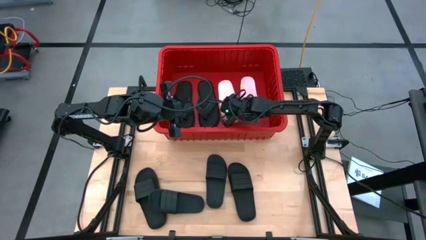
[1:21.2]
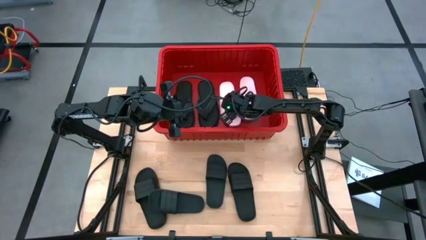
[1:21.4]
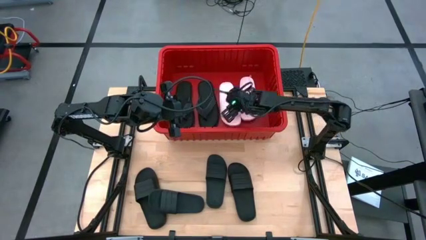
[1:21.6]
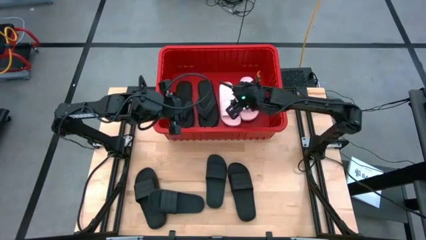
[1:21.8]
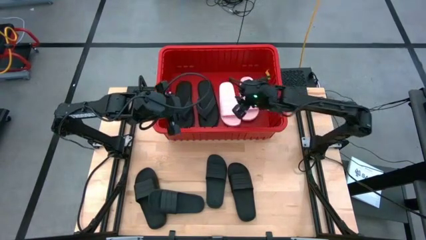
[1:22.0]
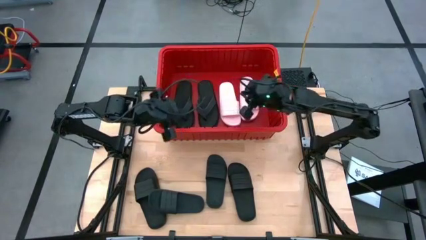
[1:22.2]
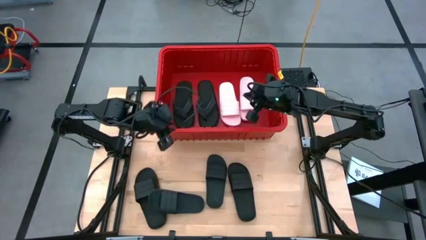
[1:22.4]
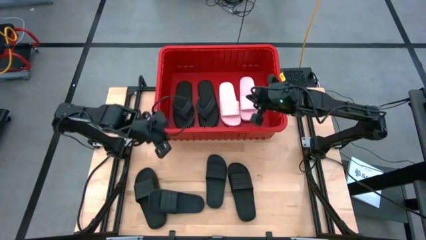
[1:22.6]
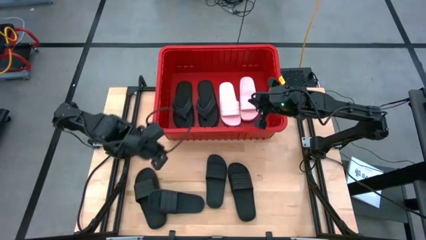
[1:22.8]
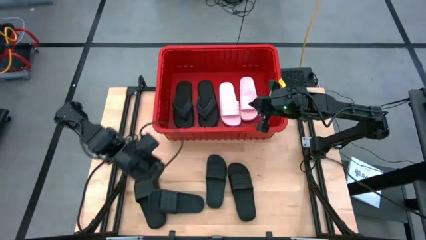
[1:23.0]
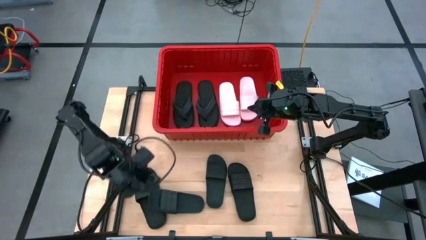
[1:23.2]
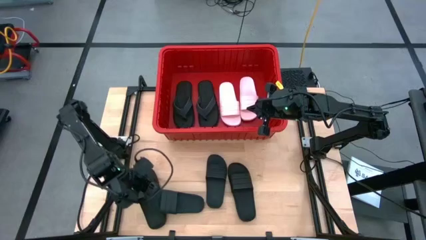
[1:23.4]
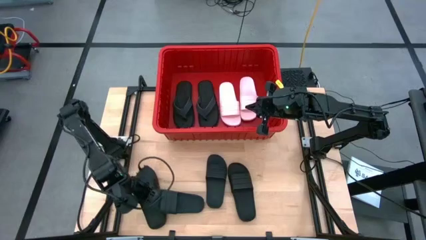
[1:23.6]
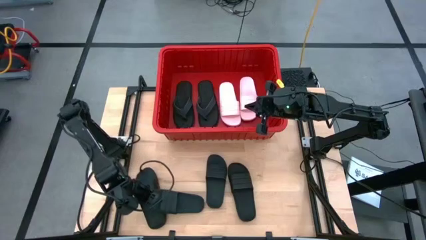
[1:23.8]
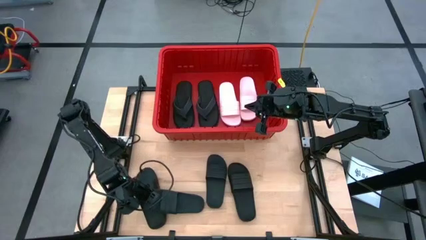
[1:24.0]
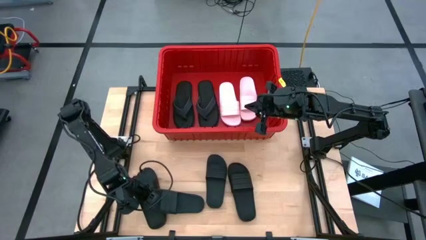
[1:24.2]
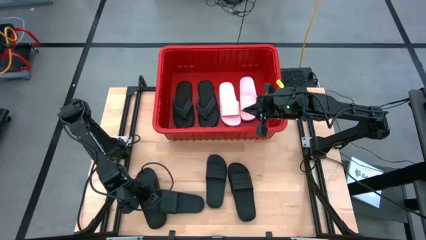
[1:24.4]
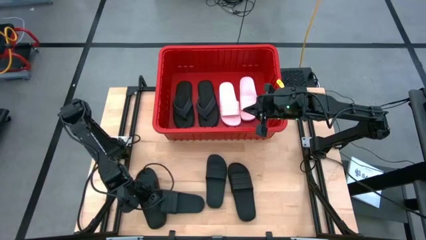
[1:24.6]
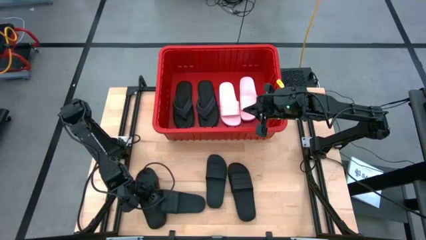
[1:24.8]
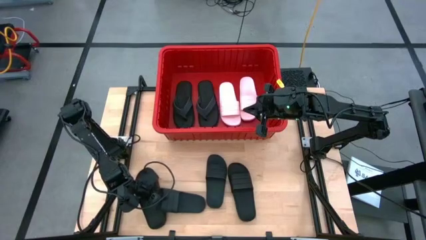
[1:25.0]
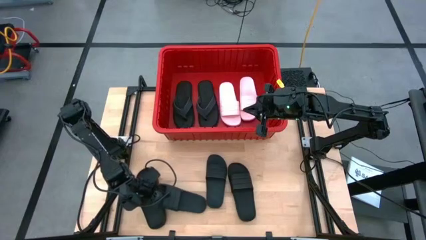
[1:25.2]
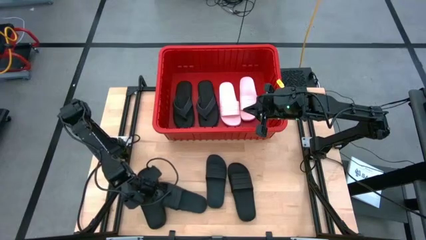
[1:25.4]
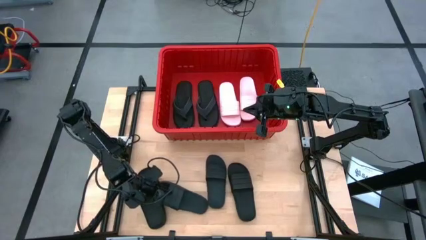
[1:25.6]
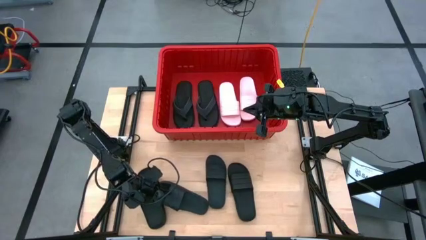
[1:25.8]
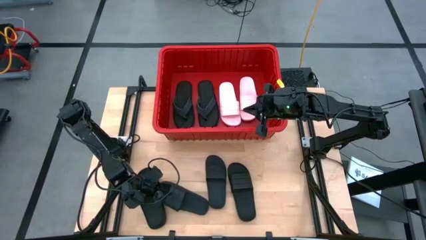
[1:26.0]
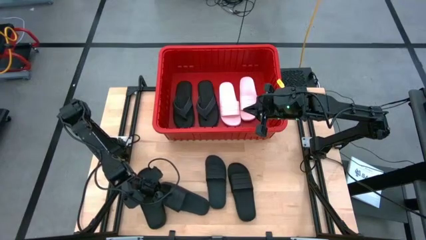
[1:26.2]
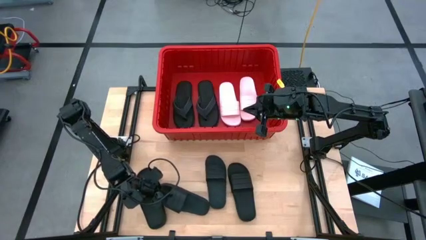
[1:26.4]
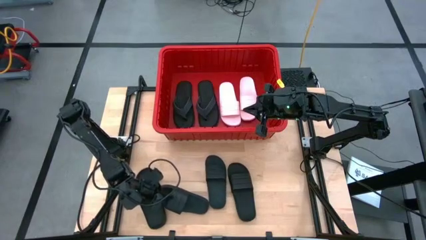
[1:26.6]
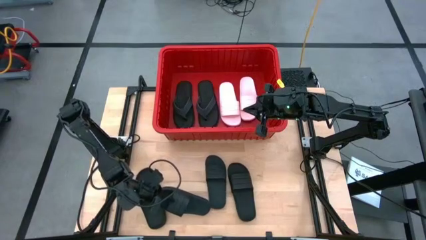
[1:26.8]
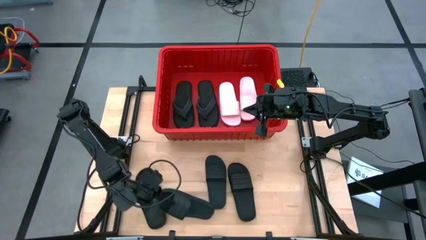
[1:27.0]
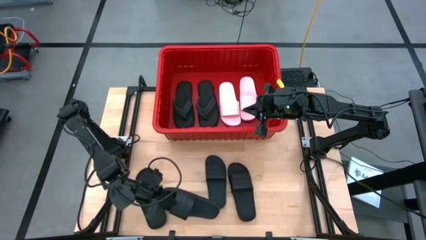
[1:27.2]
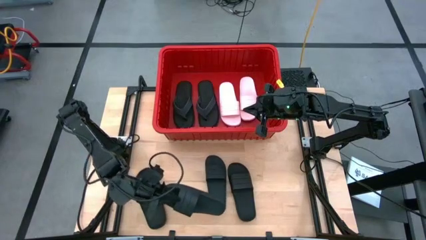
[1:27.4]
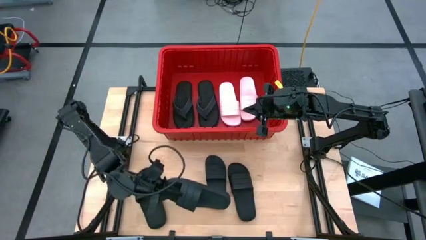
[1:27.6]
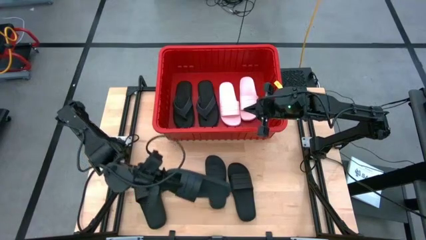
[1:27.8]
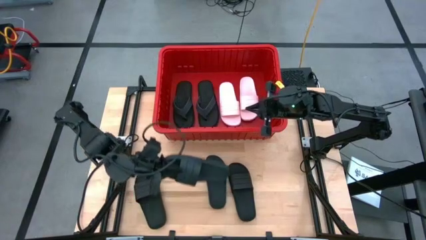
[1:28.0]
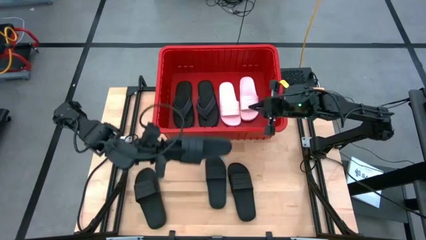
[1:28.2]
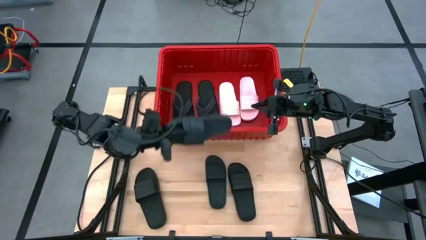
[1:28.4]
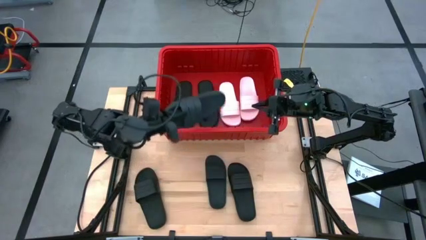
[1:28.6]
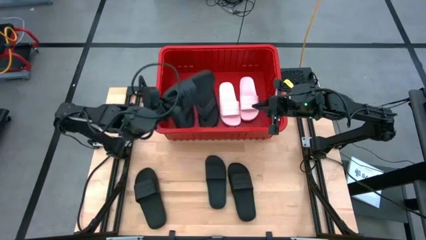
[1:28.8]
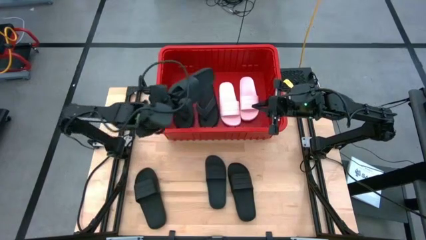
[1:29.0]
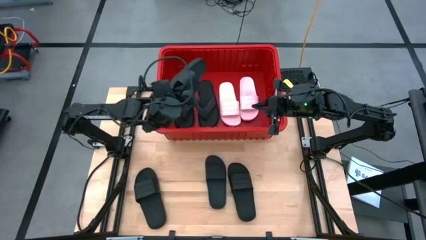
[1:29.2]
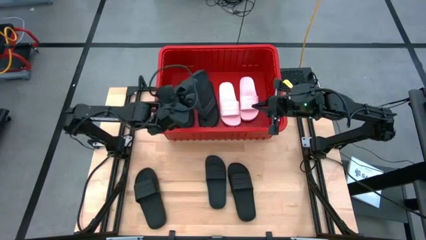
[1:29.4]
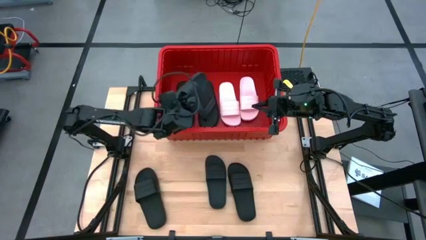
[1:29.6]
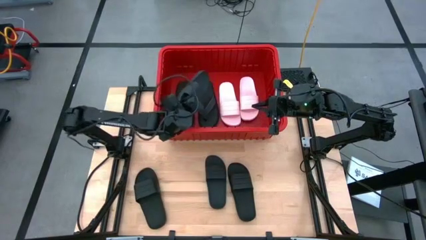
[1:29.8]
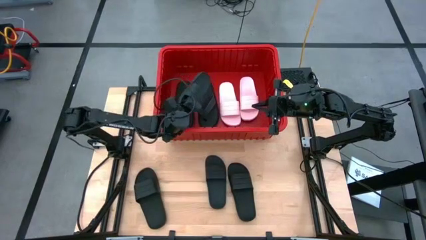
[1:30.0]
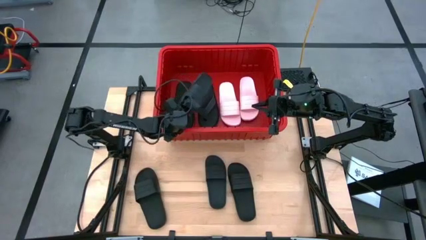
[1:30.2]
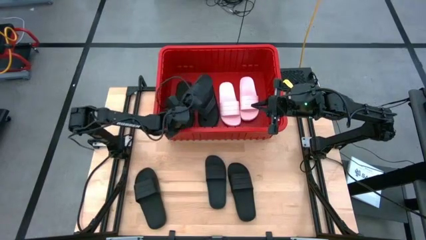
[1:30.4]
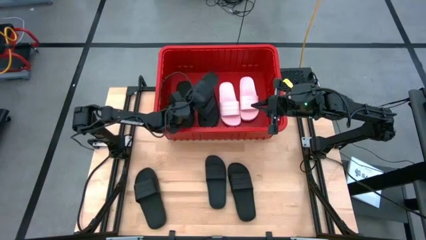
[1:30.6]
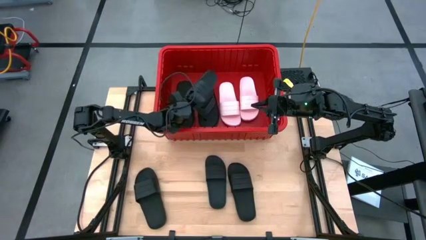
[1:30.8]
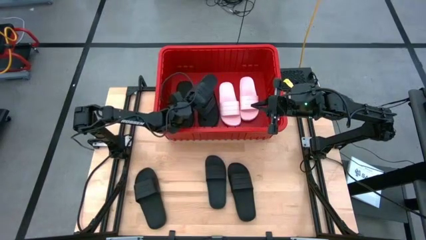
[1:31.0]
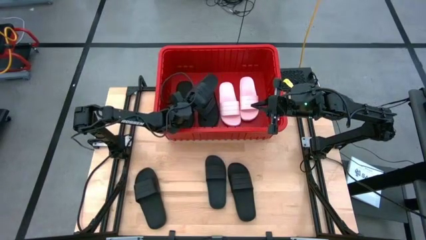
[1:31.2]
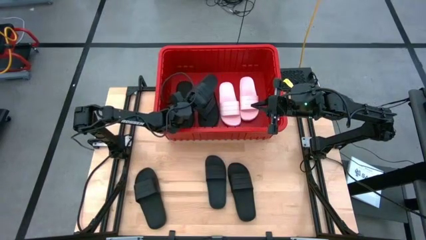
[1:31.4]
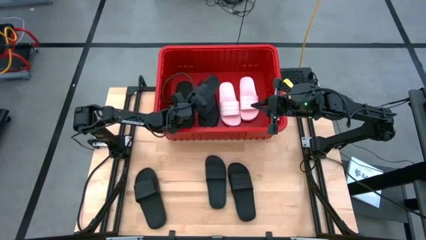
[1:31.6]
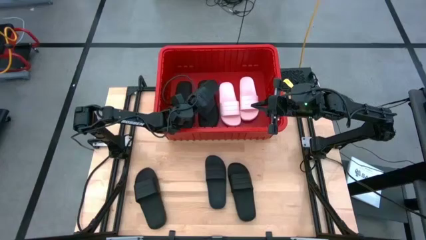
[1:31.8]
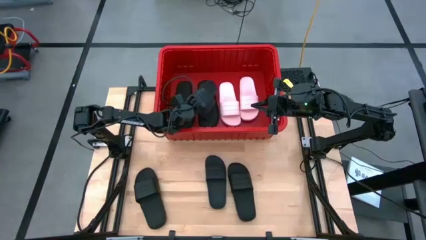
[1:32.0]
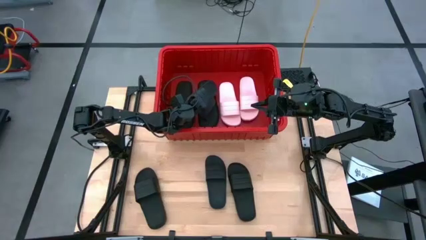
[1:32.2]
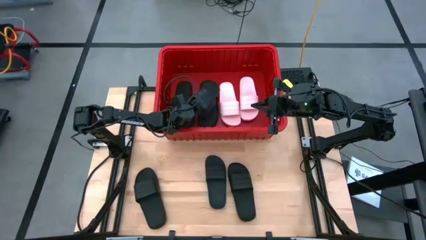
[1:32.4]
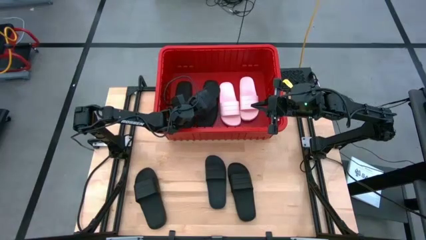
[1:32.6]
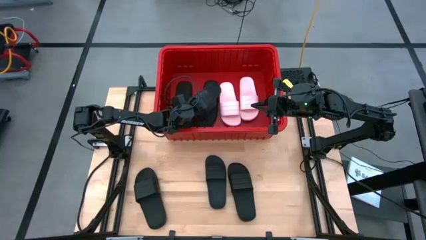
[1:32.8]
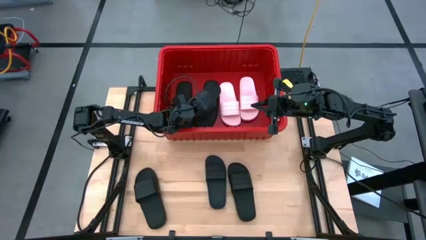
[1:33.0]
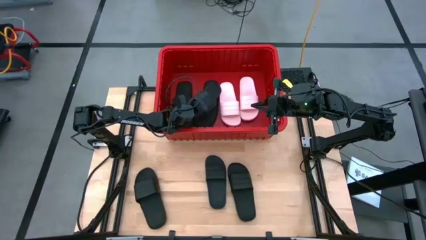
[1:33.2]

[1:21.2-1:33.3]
Task: Pick and place slides into bin
Put the black slide into the red bin

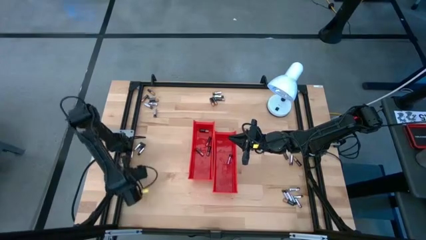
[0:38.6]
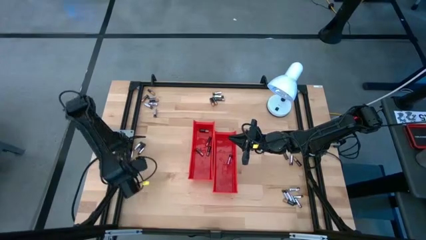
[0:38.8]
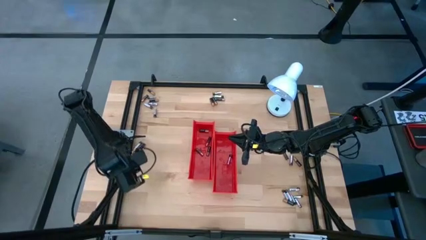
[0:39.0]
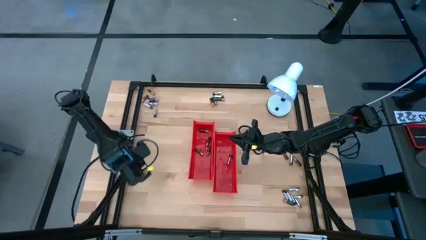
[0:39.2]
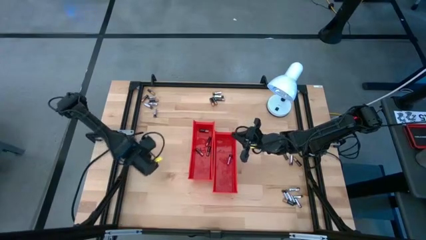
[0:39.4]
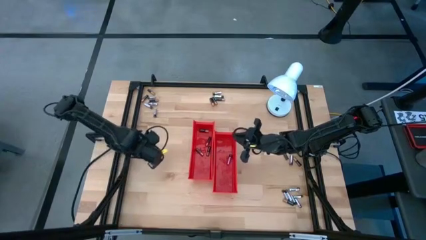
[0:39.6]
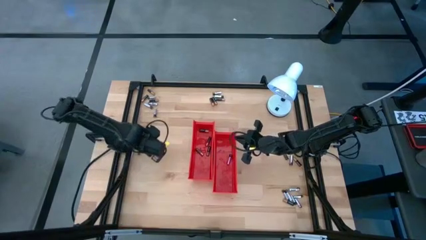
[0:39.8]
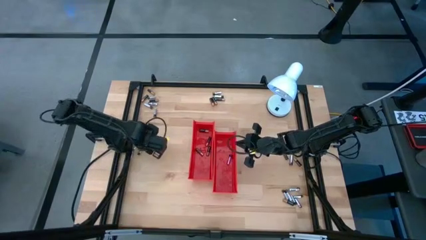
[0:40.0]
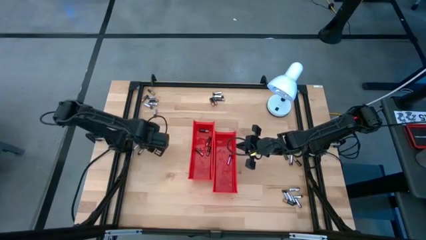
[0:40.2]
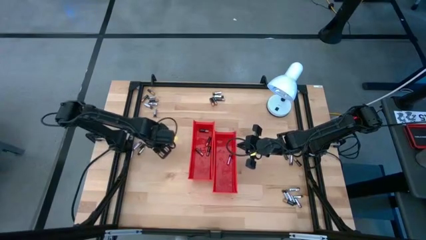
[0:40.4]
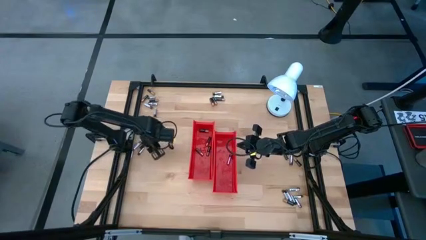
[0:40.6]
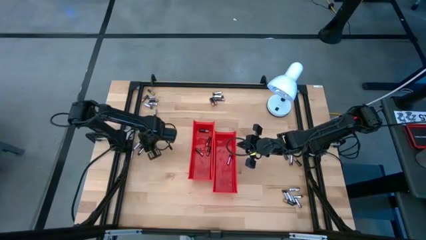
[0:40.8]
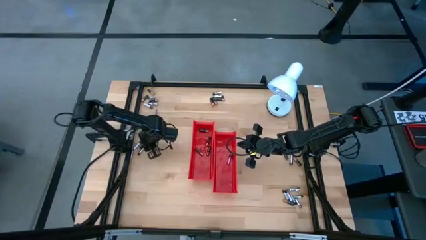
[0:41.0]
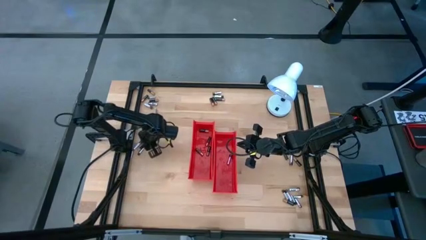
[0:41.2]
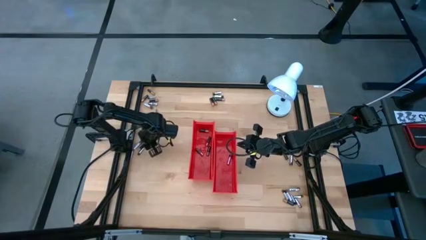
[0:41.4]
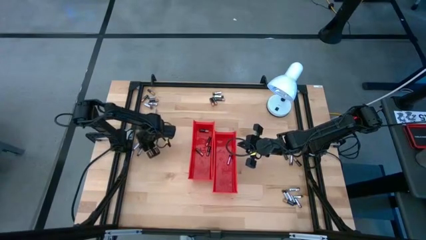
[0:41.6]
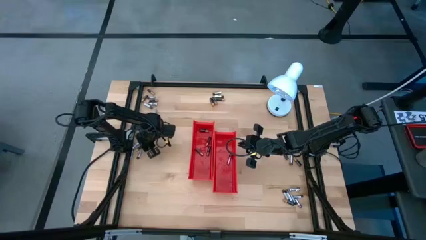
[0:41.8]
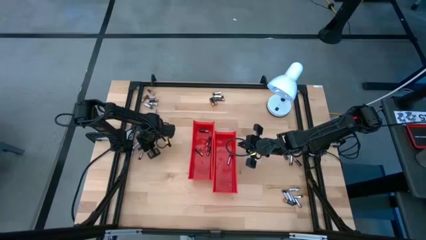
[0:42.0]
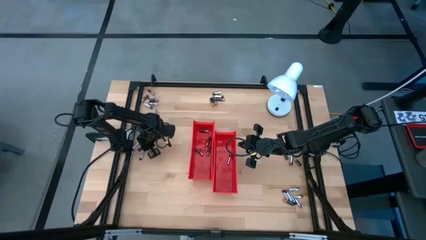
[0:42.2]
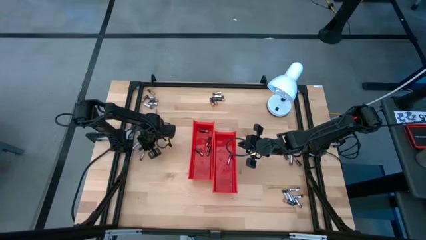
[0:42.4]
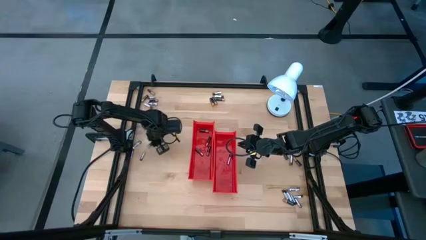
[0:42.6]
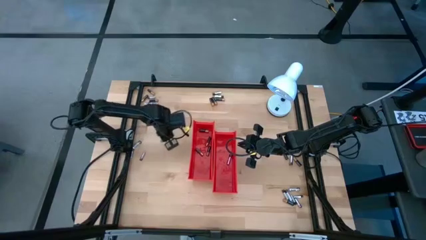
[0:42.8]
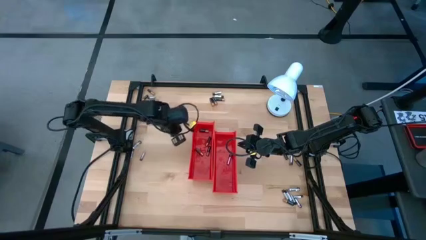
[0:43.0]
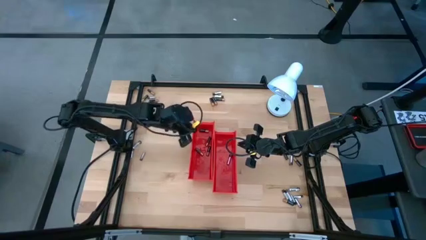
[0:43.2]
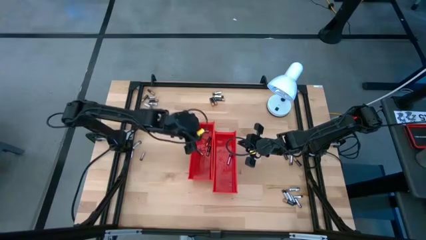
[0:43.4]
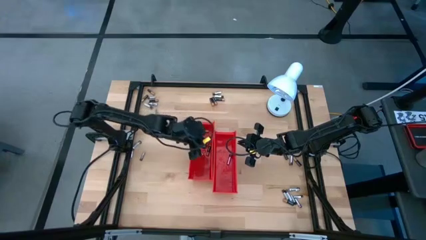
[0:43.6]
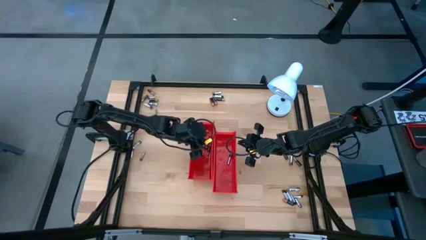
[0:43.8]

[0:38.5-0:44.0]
Task: Sort batteries
Put the black battery into the left red bin
